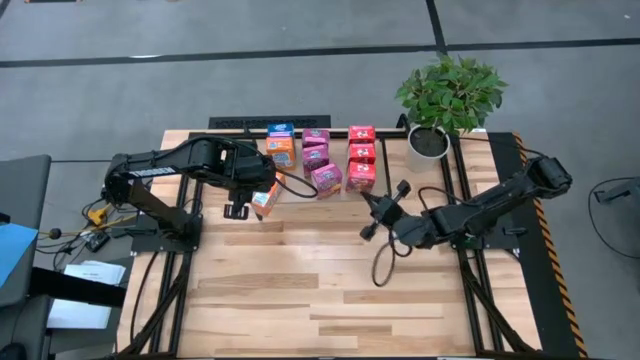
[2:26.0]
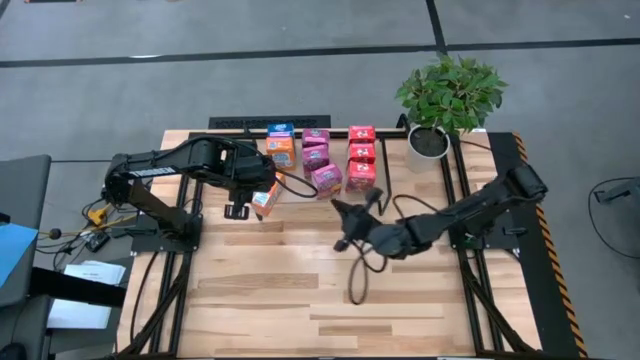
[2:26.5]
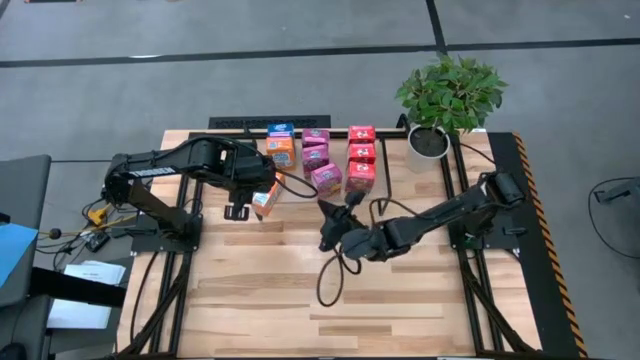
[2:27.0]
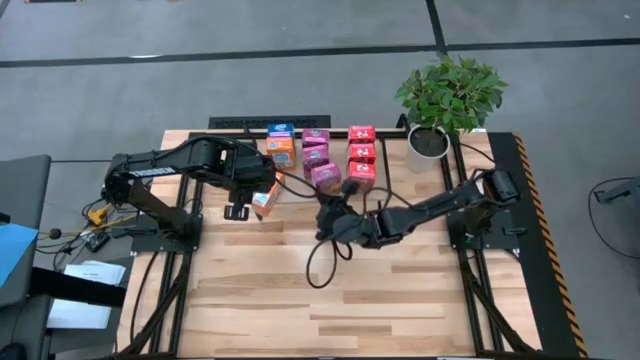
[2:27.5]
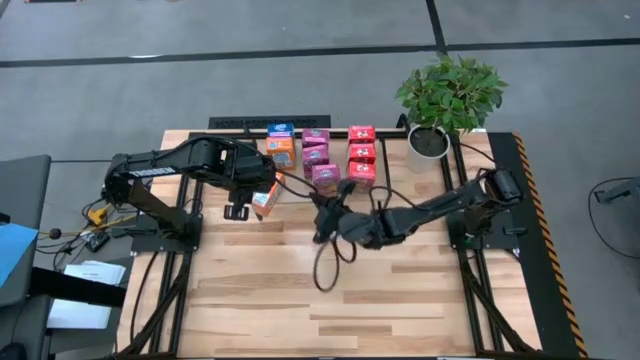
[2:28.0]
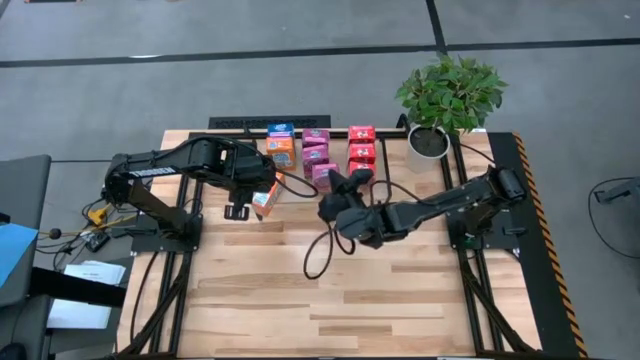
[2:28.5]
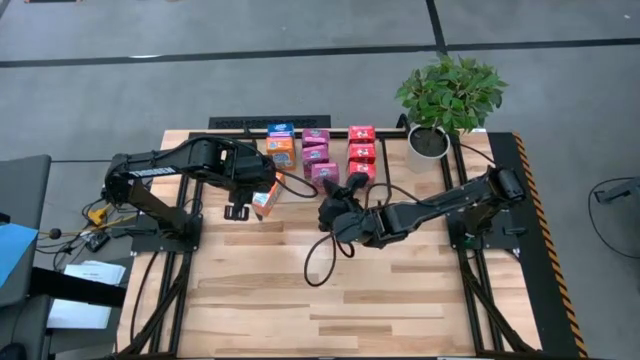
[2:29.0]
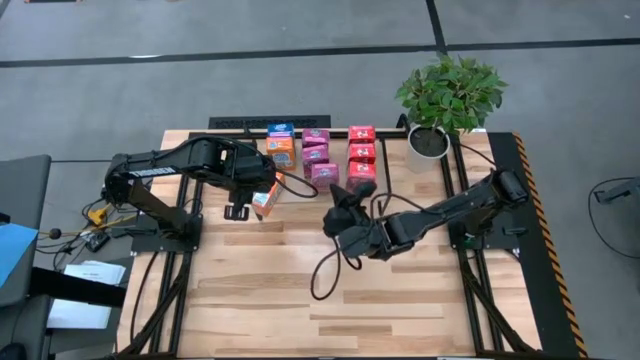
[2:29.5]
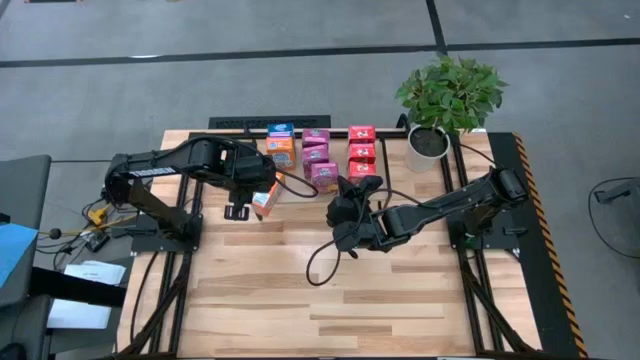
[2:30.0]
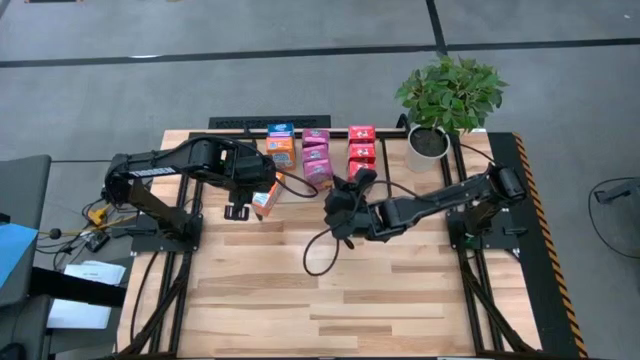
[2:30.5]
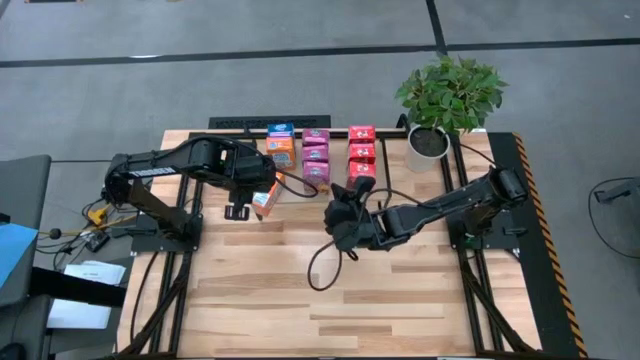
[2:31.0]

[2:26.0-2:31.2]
Task: Stack cereal on shelf
Adjust the purple cereal box on the shelf

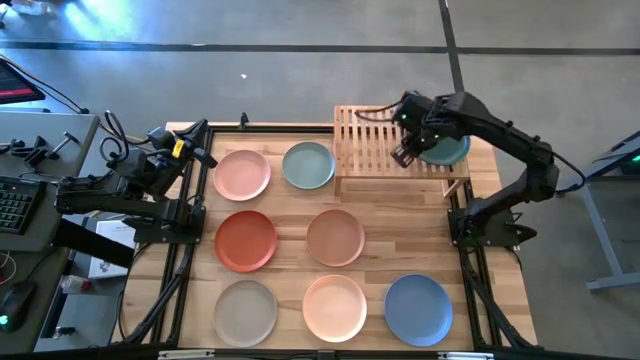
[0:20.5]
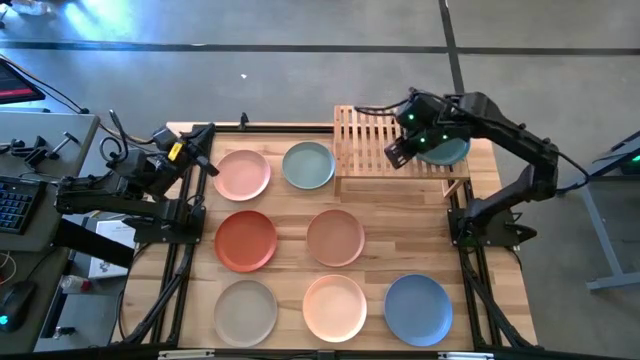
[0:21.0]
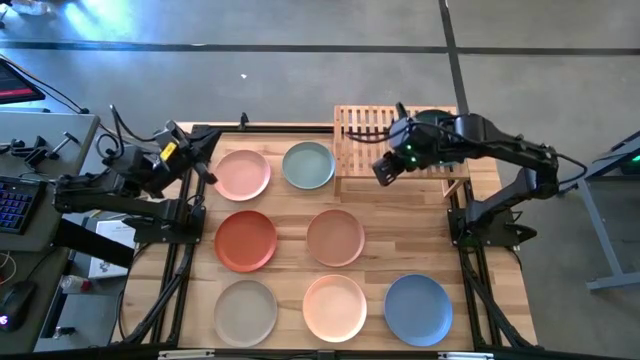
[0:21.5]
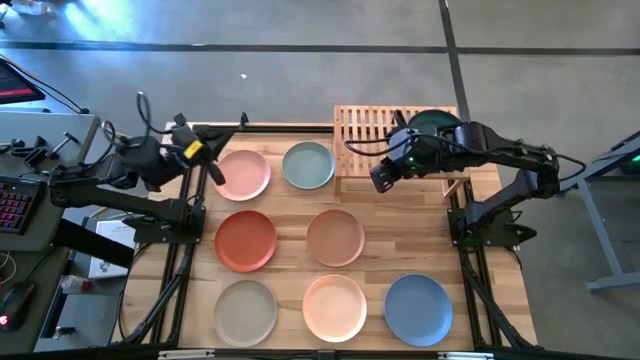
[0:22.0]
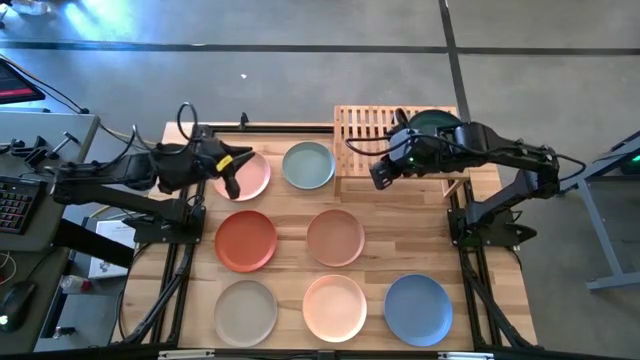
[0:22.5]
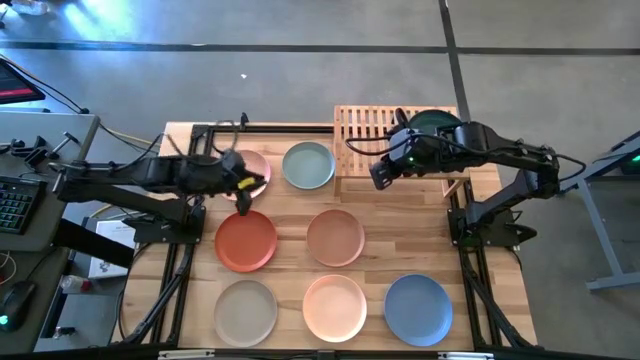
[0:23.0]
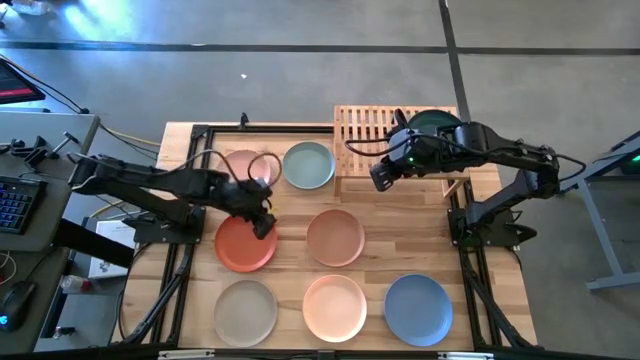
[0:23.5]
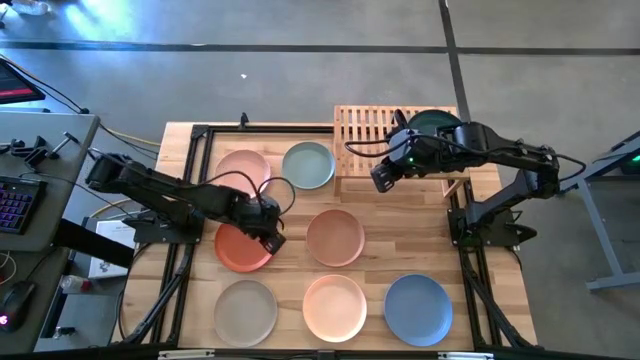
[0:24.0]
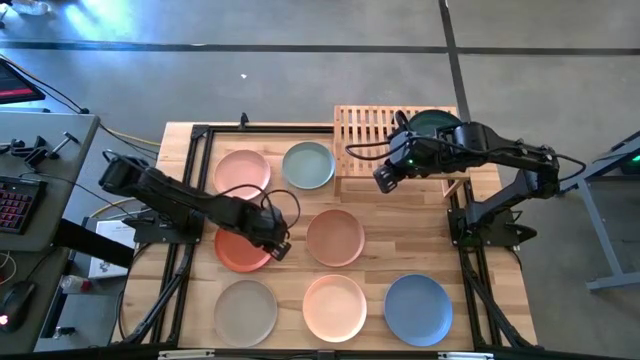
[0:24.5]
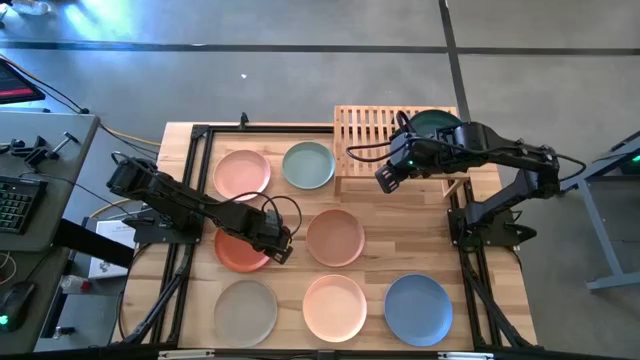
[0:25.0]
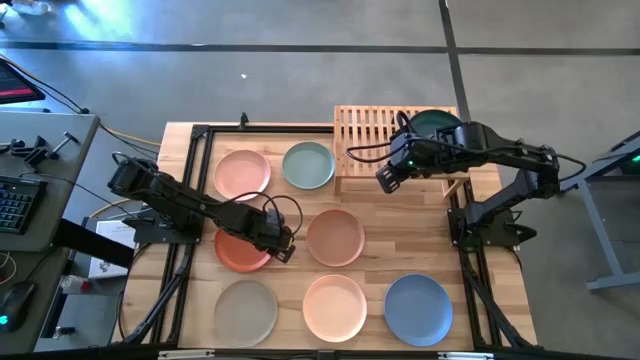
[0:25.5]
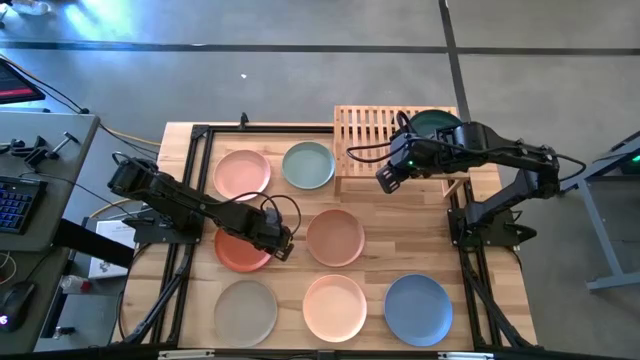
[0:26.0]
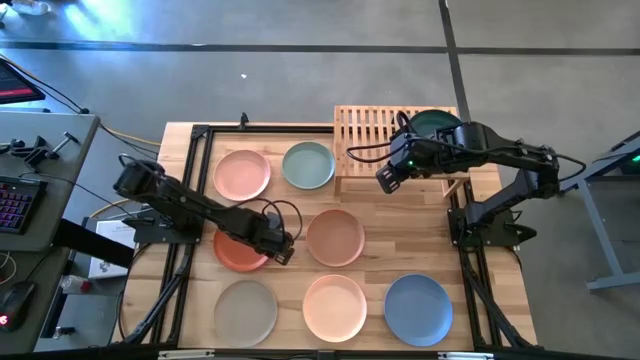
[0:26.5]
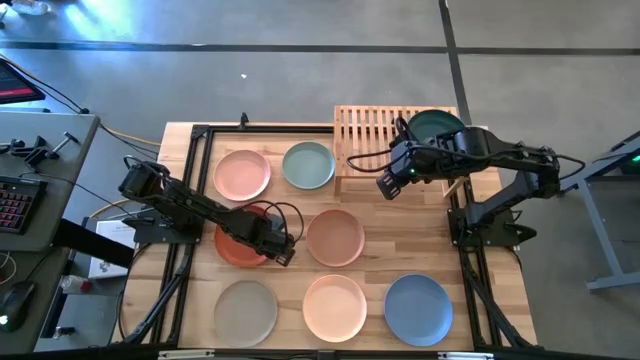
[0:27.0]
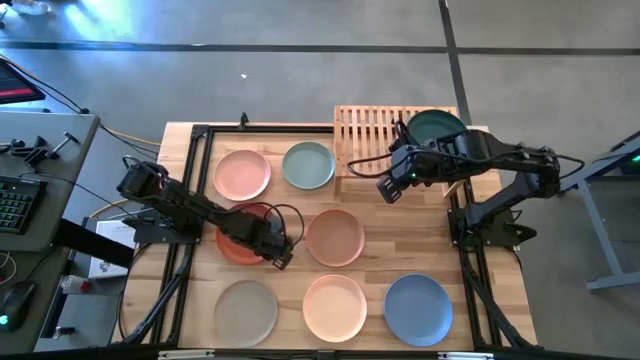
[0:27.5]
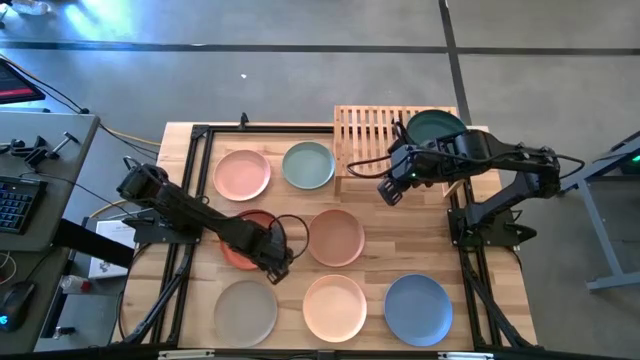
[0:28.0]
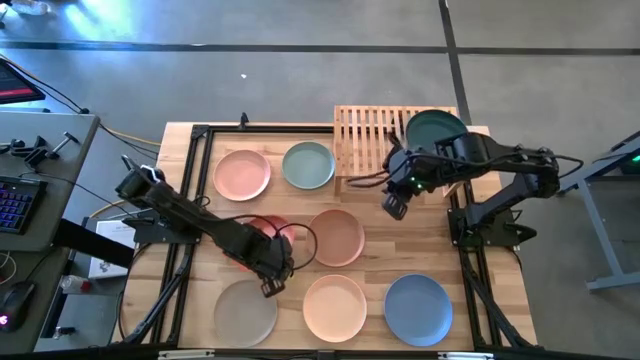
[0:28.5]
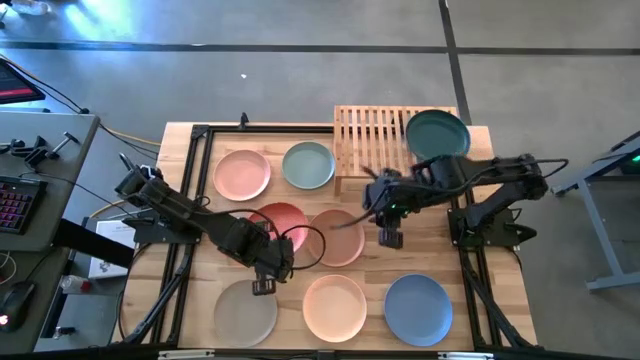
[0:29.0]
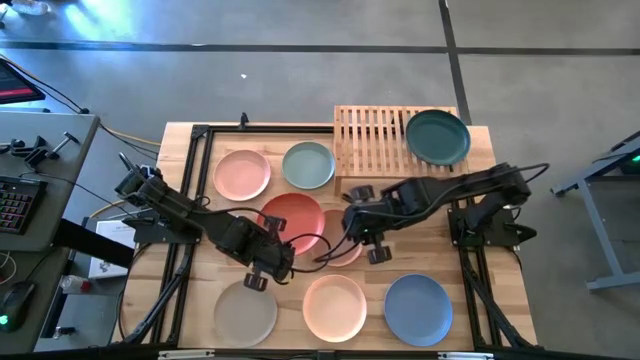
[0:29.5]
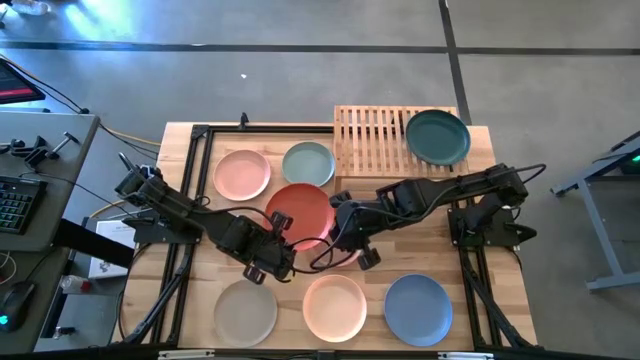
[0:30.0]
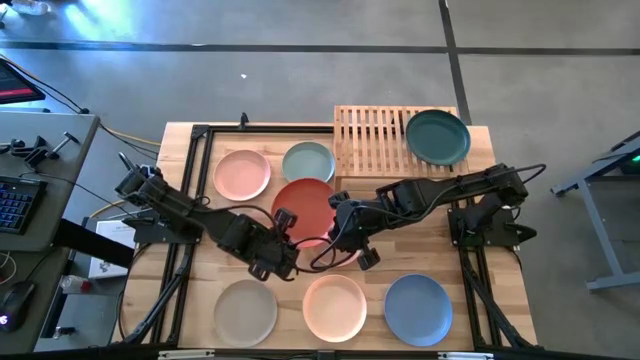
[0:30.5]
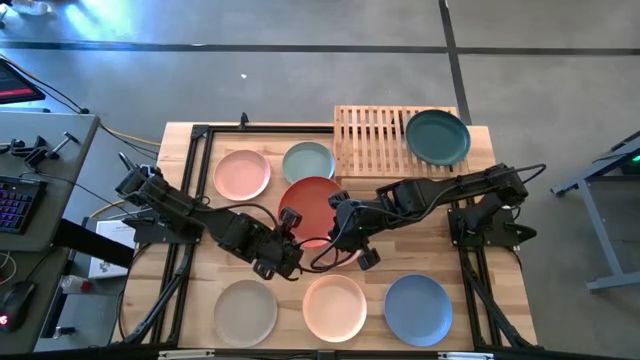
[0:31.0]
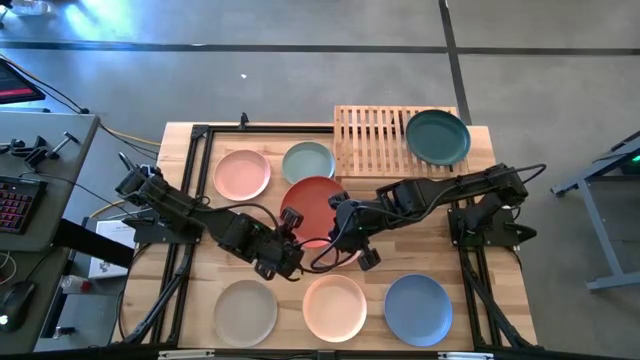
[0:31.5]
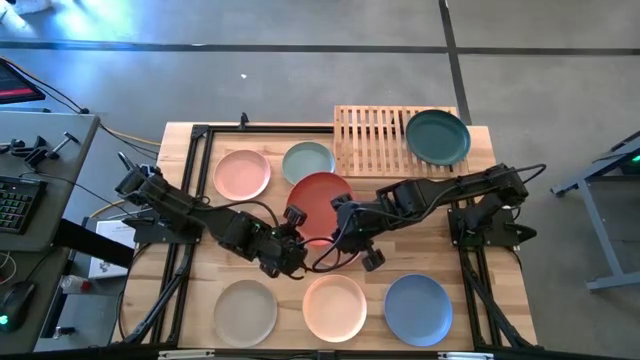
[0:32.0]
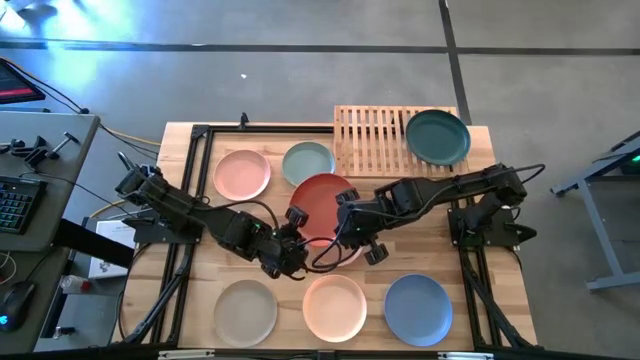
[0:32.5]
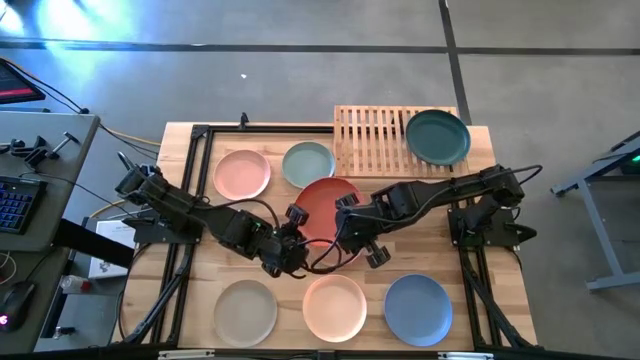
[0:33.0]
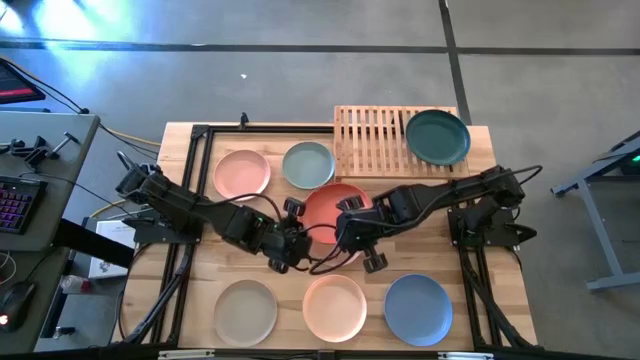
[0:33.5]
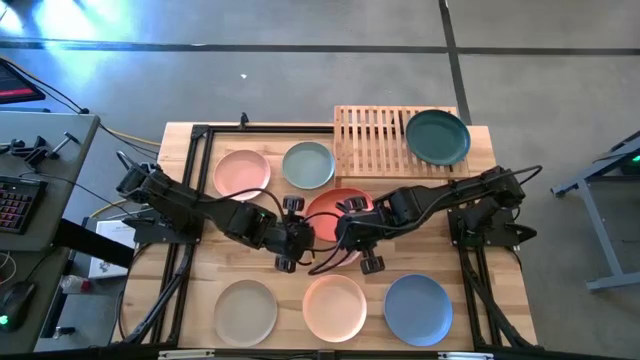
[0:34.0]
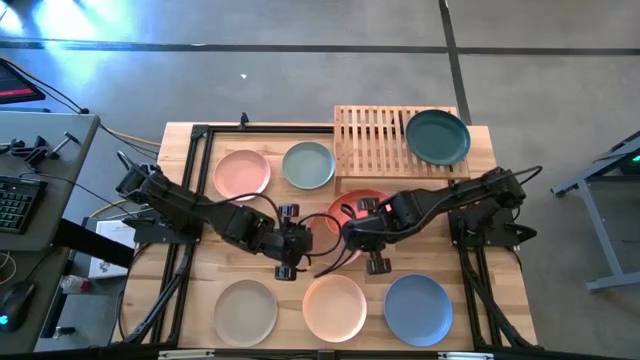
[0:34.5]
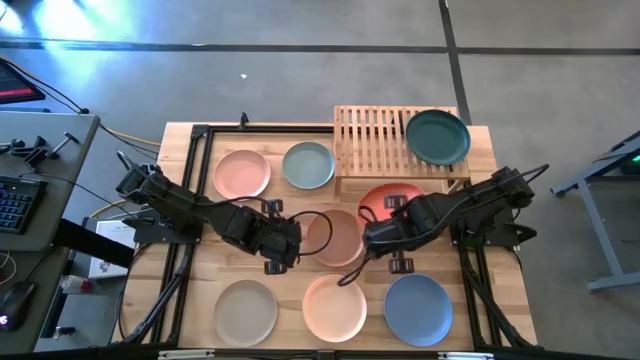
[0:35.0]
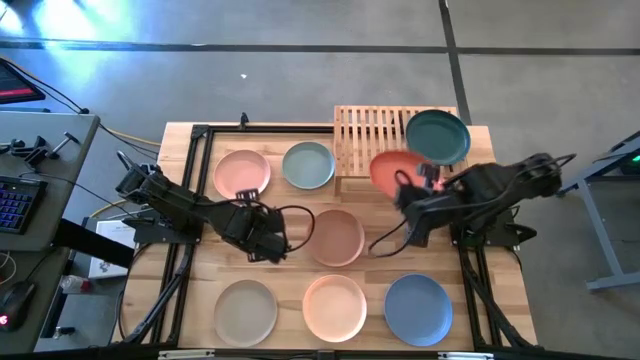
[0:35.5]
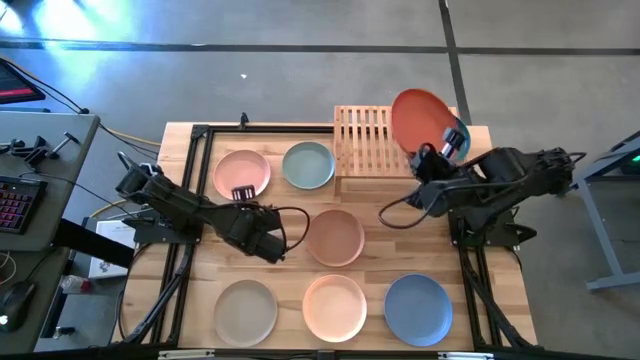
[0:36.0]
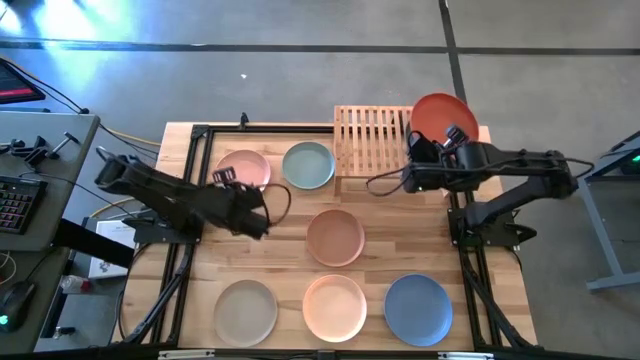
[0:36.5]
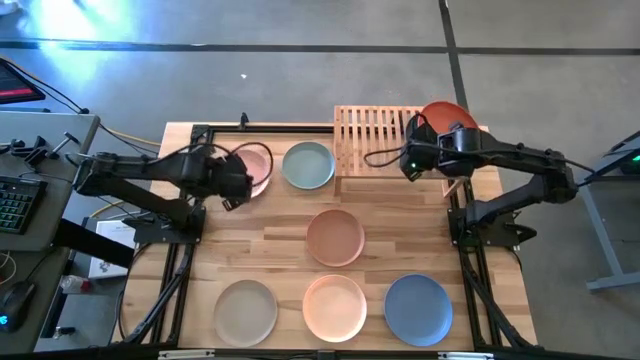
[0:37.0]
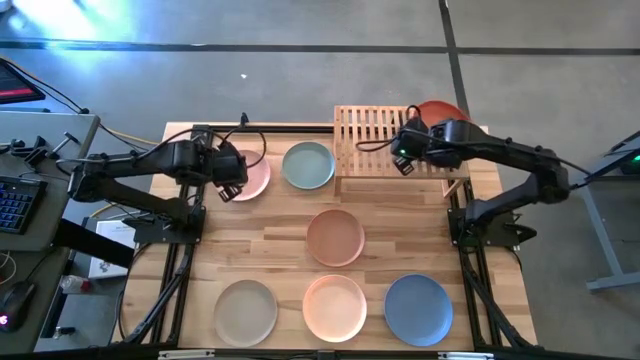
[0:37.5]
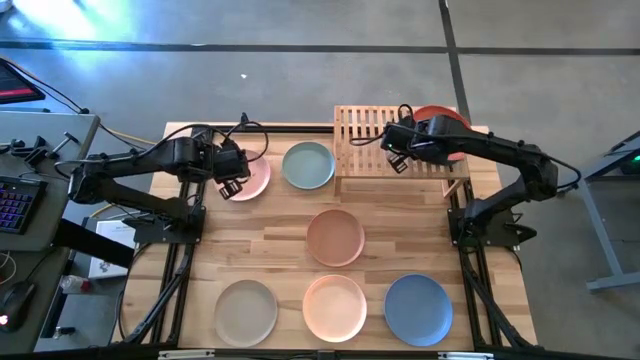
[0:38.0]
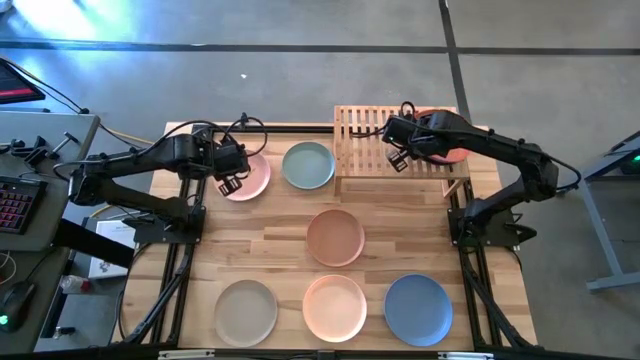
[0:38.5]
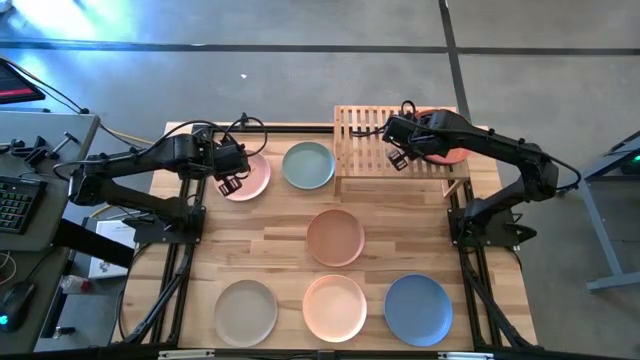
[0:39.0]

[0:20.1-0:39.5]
Task: Place and stack plates onto a shelf
Stack the orange plate on the top of the dark blue plate on the shelf
